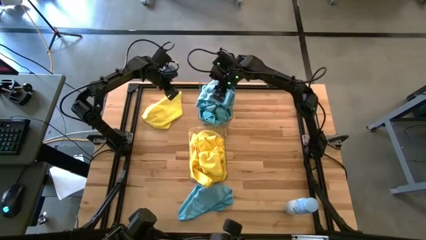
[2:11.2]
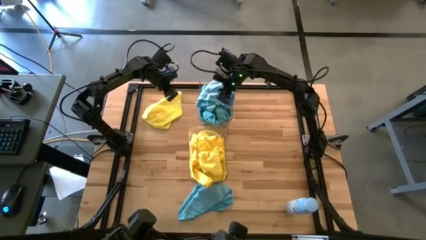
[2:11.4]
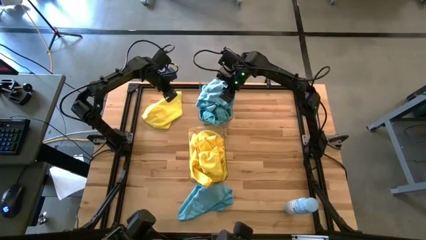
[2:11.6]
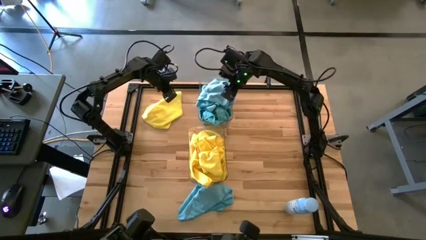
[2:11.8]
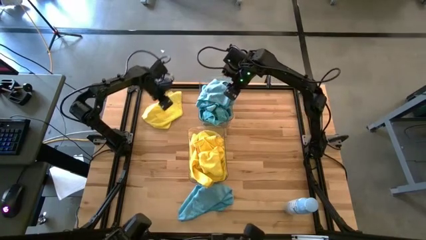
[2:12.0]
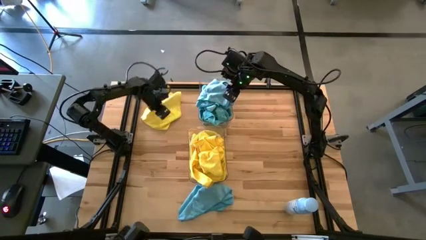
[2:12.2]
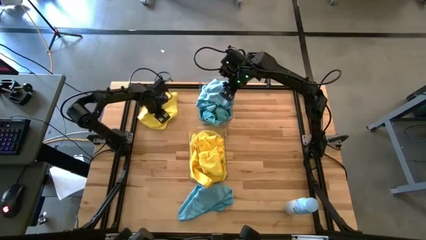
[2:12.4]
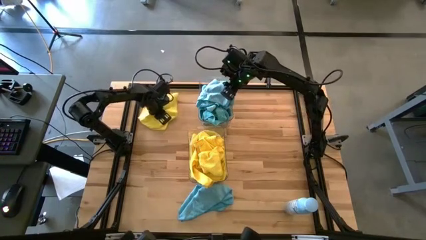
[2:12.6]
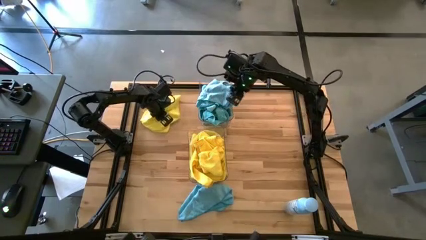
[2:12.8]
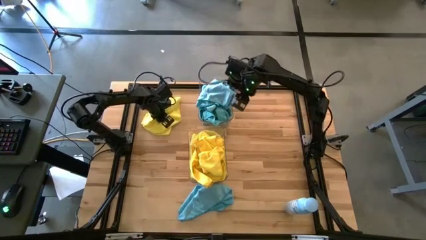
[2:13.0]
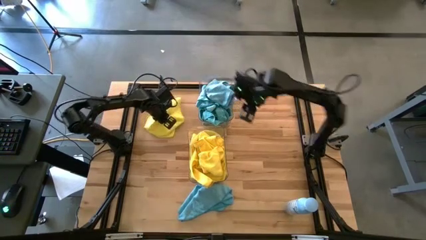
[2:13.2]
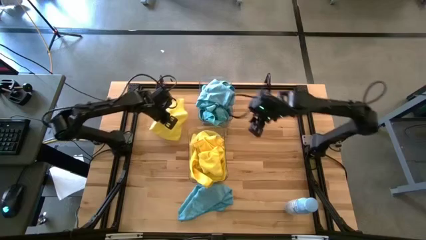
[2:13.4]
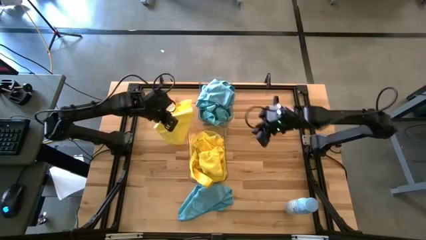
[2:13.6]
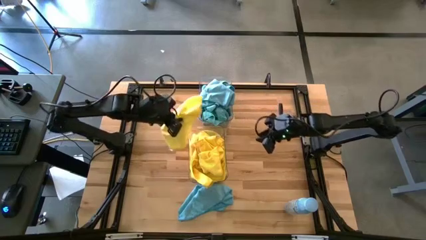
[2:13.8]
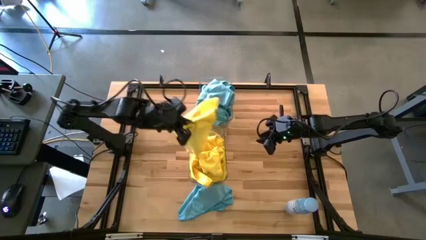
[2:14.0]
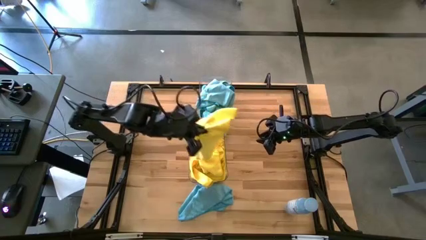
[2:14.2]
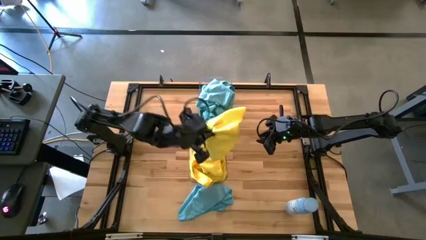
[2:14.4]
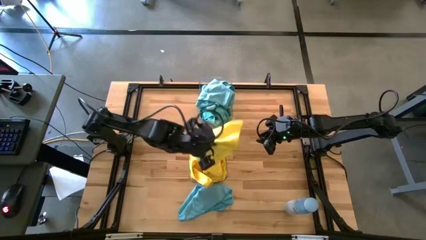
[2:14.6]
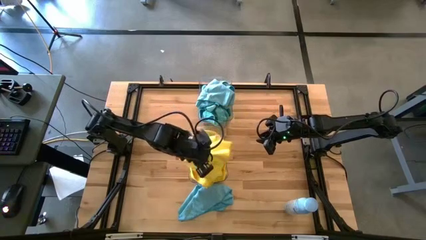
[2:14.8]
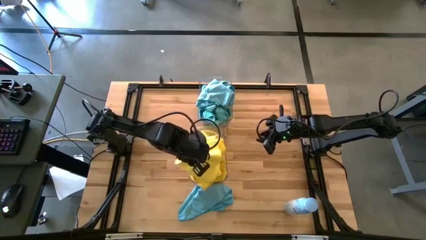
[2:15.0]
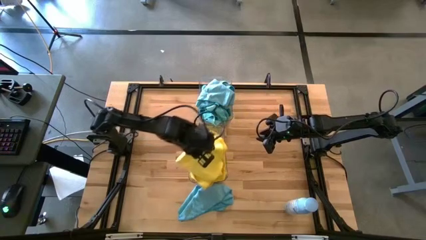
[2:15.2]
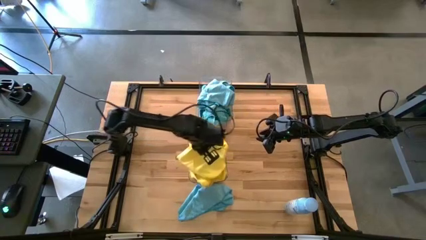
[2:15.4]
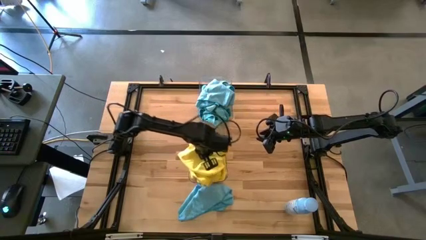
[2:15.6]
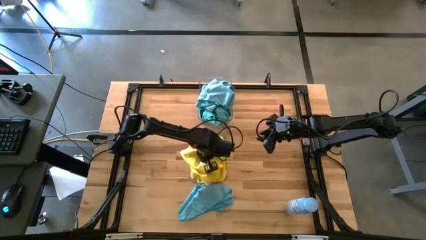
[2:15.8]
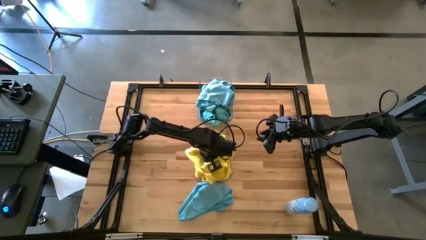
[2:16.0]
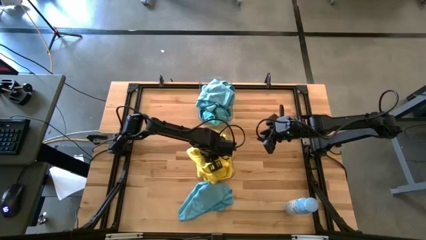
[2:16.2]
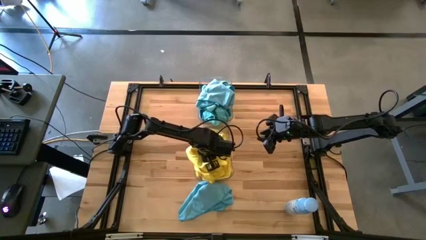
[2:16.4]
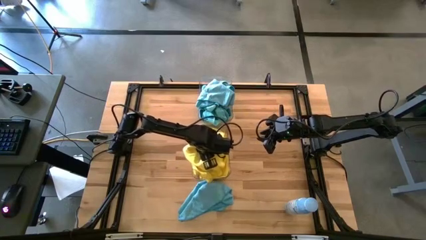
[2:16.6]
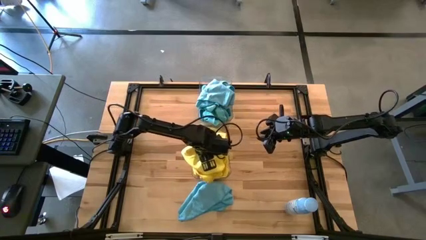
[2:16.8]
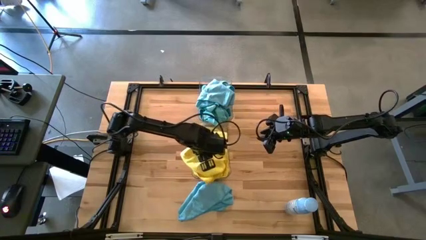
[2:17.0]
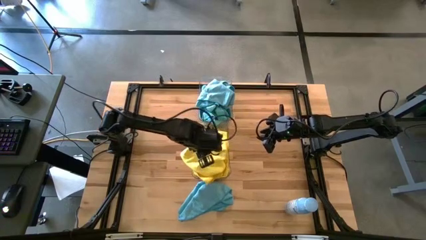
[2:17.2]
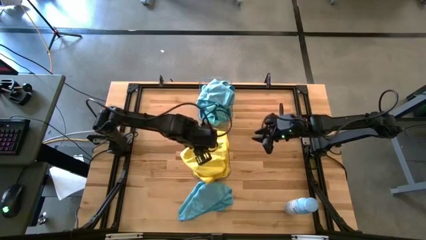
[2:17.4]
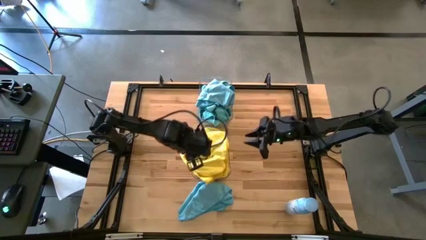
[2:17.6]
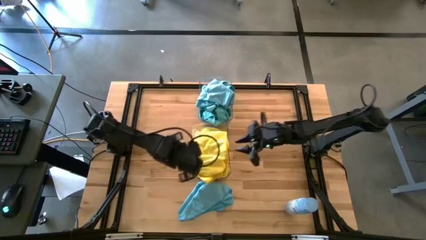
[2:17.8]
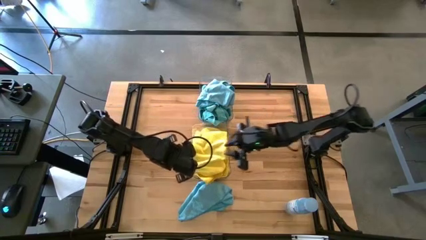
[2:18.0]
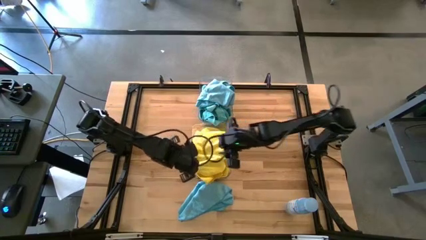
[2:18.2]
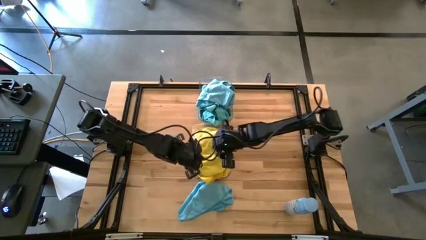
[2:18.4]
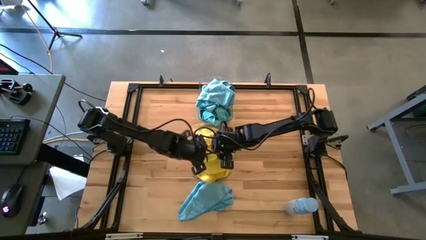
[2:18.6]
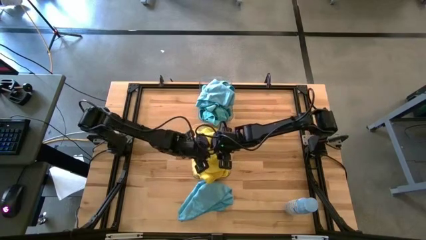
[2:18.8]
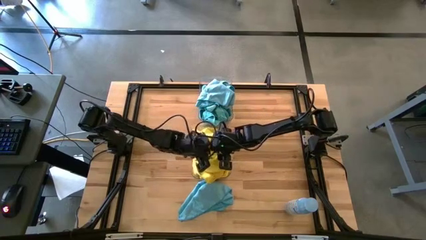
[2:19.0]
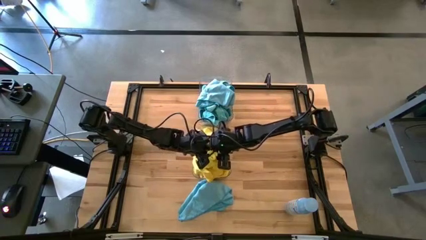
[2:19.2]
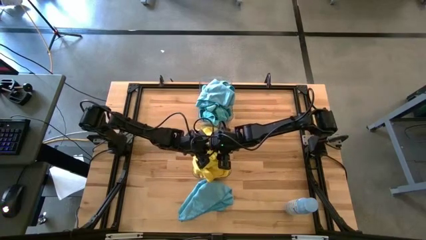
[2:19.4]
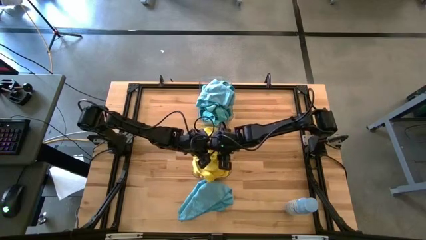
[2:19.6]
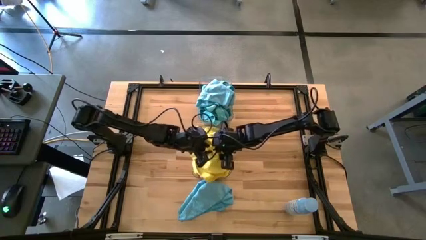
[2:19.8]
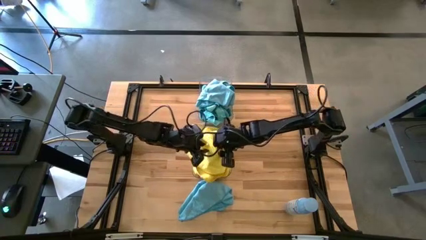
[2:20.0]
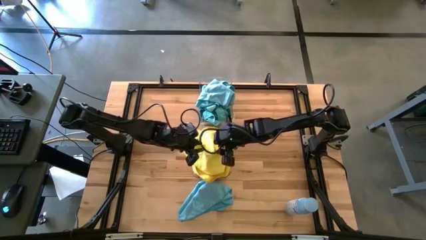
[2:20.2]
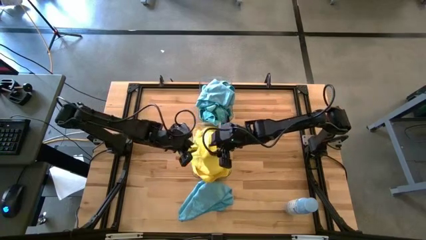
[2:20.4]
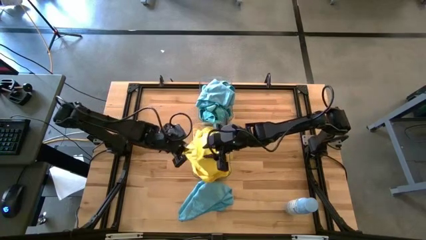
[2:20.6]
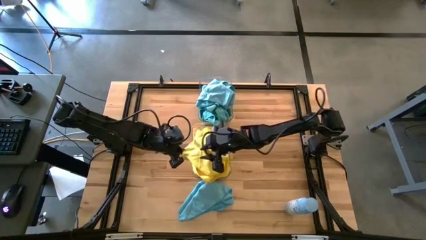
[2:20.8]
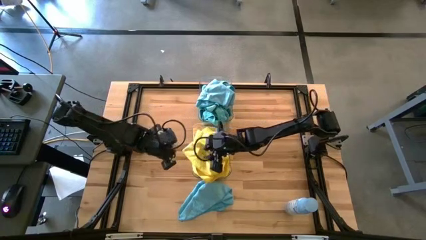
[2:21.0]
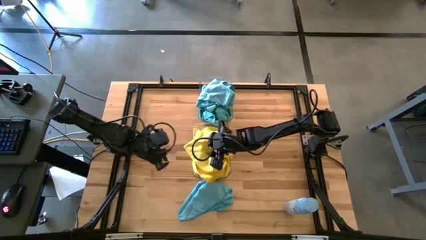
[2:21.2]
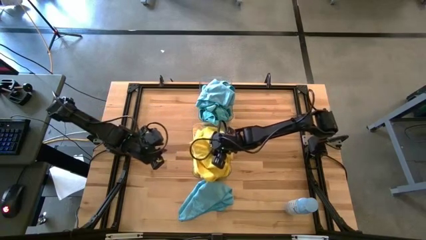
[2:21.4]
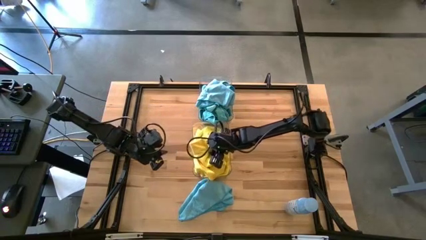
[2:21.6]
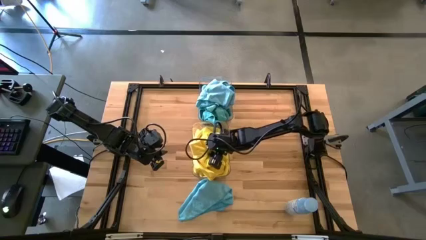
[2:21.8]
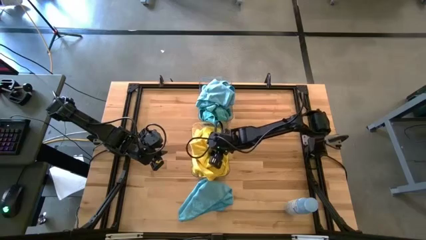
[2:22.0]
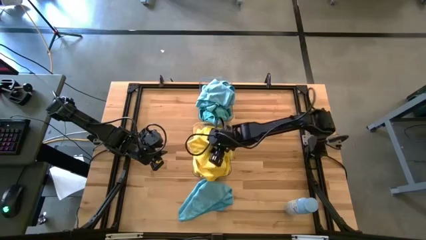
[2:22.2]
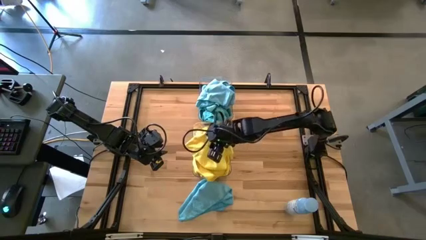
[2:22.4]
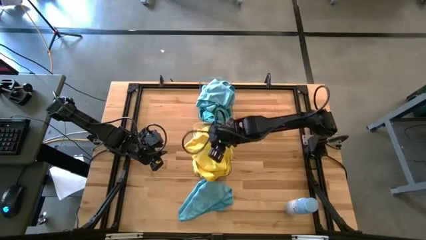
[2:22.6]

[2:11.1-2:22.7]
Task: Sort microfiber towel by color & place in baskets
Put the yellow towel into the bottom transparent bin

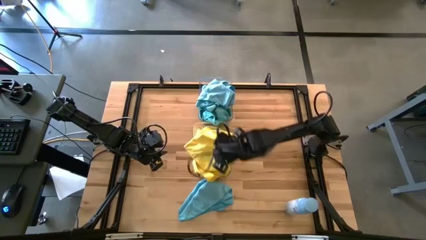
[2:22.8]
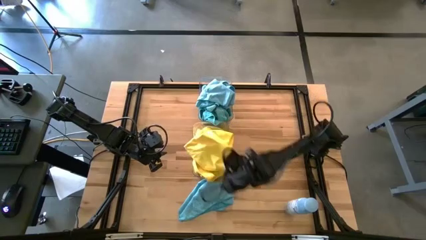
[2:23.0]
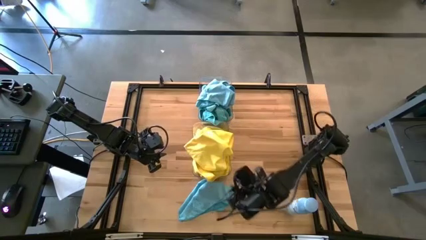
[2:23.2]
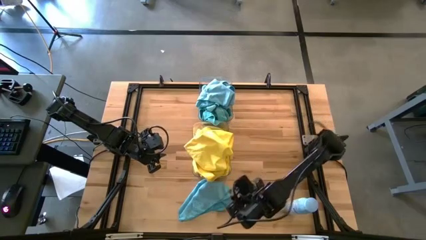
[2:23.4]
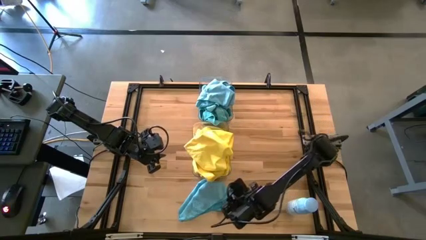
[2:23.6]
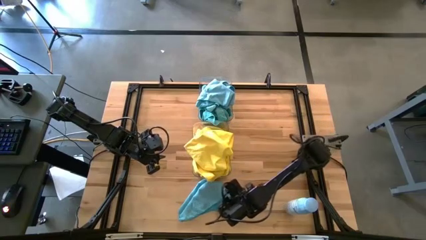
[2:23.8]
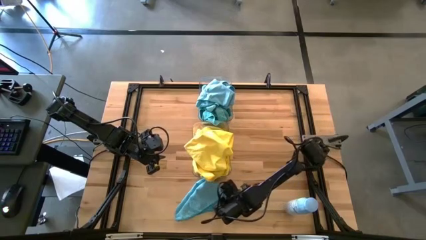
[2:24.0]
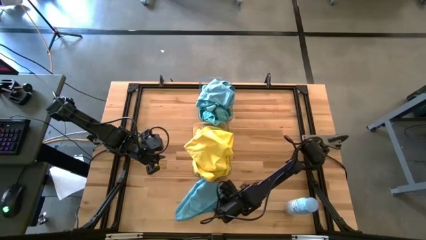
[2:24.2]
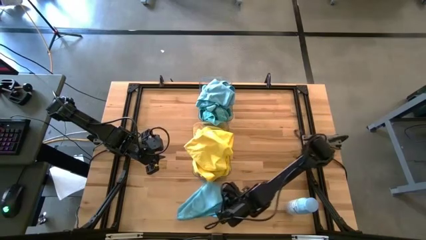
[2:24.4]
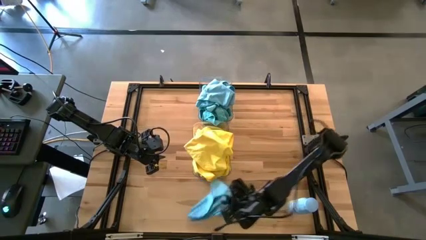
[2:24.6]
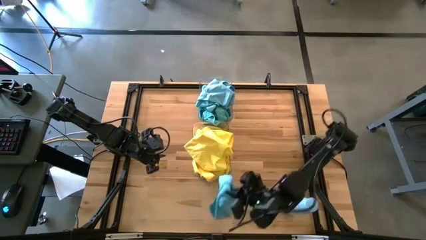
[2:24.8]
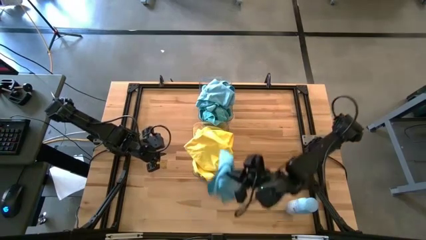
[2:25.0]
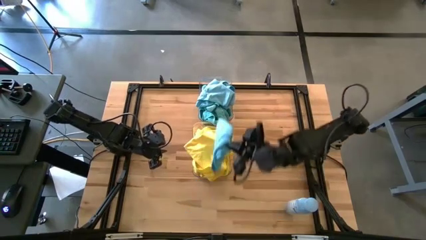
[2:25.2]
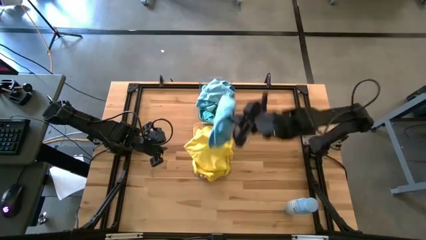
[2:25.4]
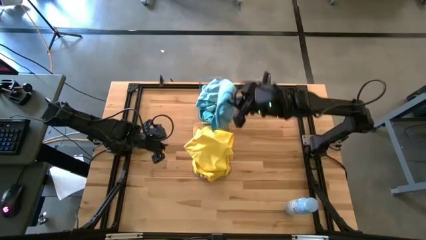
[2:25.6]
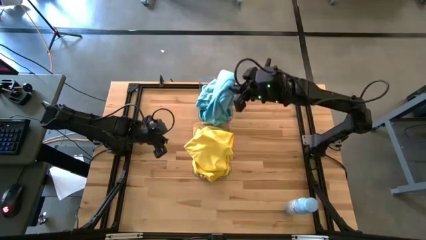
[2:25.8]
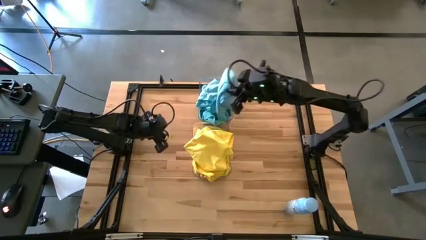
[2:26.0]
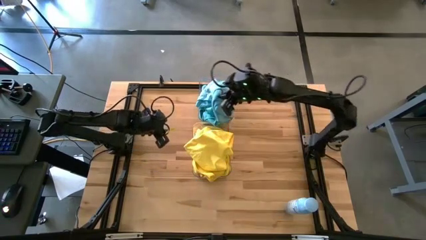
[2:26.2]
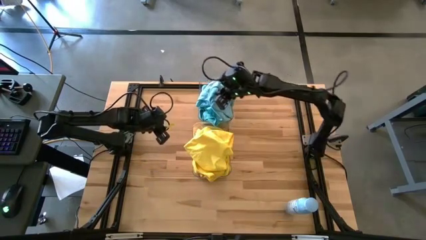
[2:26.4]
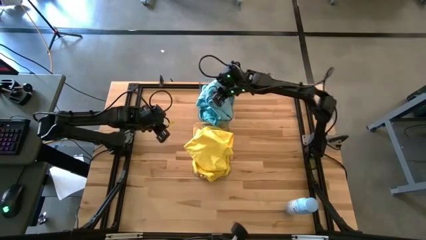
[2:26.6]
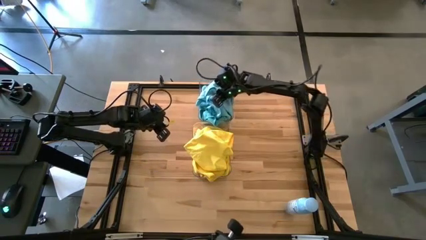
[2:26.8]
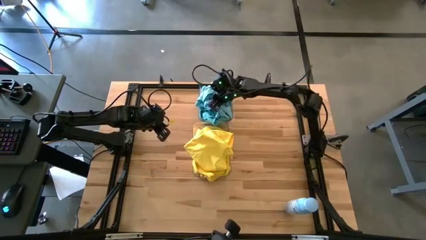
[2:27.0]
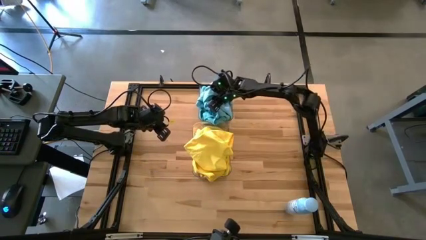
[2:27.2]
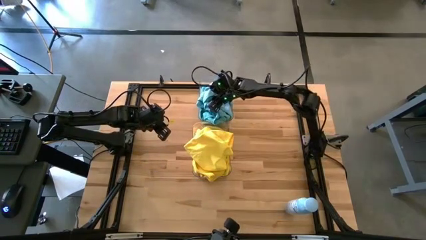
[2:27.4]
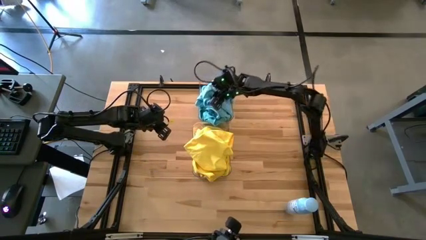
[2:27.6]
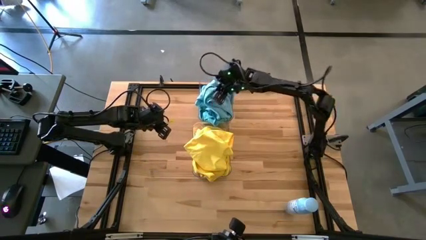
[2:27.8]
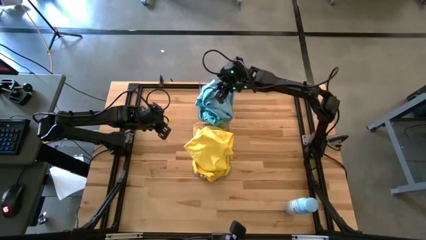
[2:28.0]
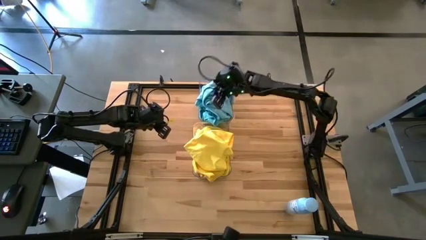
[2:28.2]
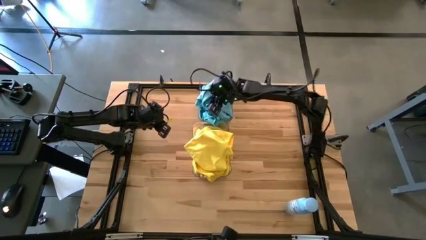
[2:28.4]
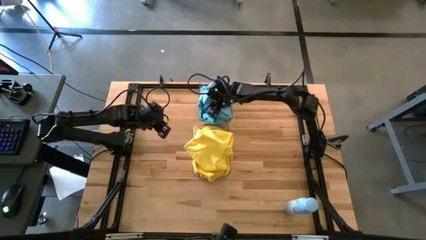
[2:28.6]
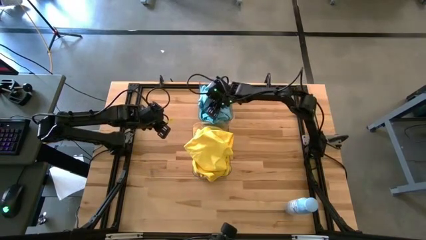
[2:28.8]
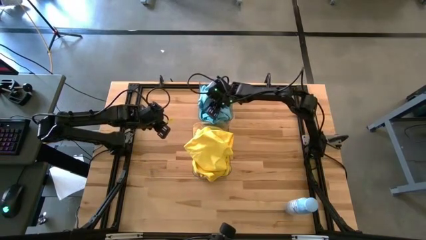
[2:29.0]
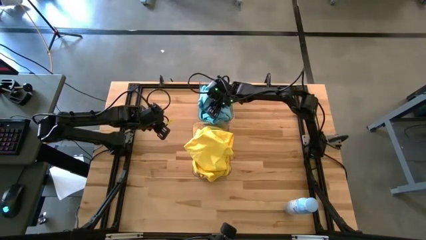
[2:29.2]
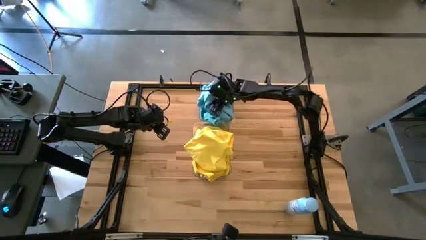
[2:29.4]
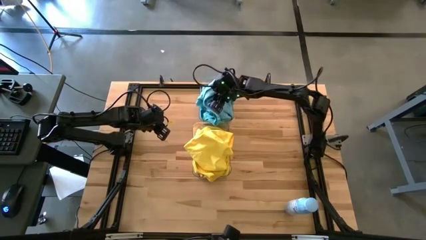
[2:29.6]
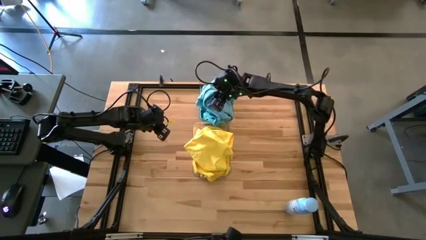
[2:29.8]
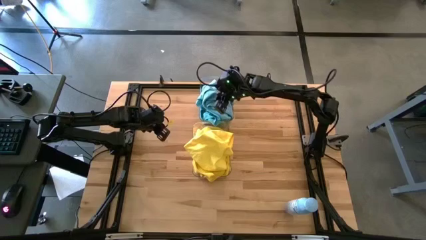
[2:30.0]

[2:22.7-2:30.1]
Put the blue towel into the top transparent bin
